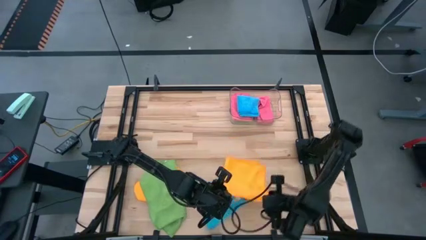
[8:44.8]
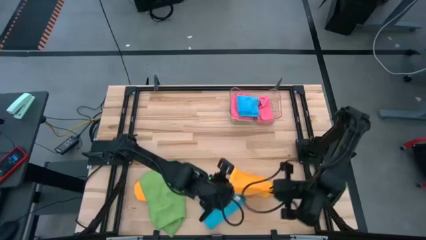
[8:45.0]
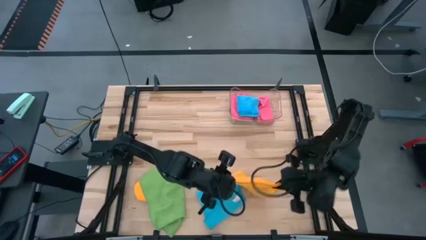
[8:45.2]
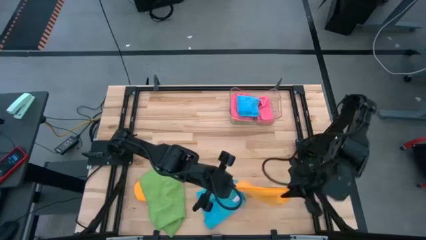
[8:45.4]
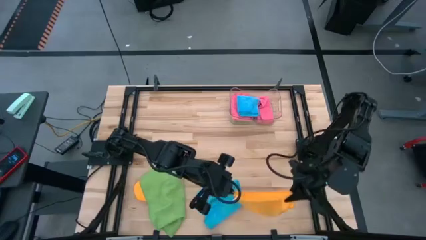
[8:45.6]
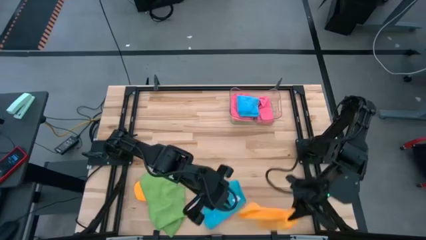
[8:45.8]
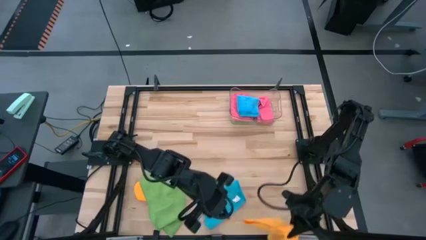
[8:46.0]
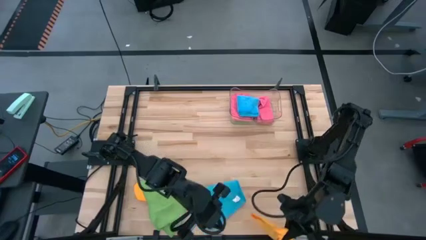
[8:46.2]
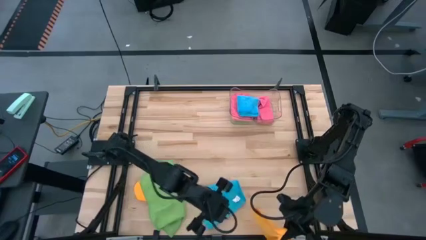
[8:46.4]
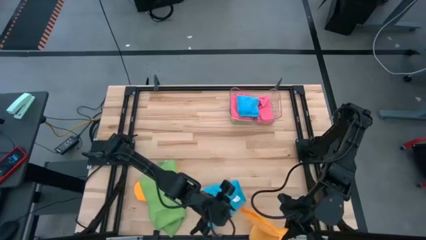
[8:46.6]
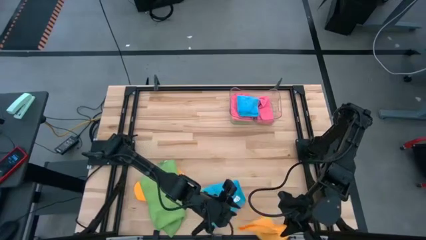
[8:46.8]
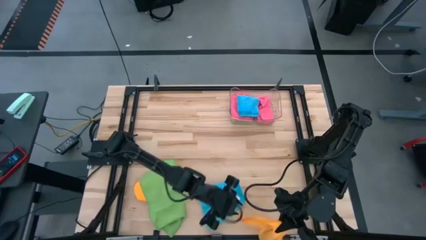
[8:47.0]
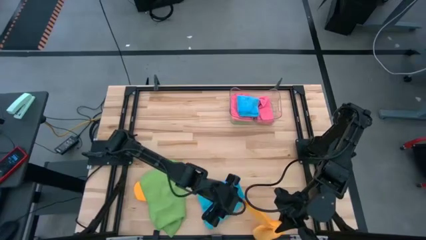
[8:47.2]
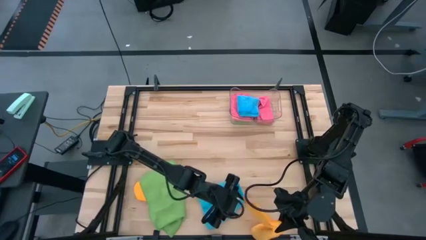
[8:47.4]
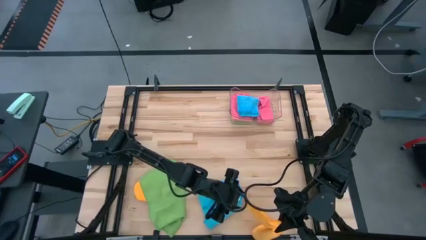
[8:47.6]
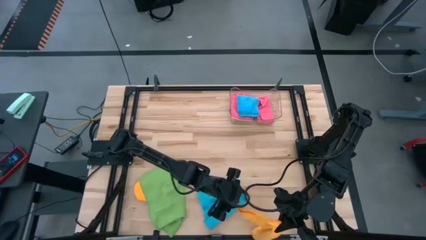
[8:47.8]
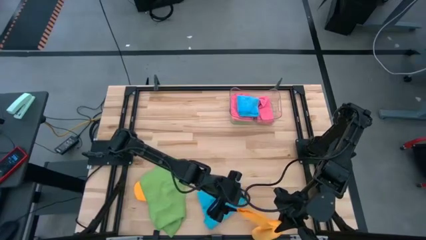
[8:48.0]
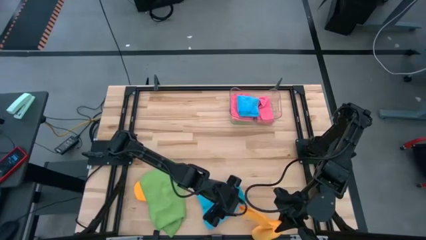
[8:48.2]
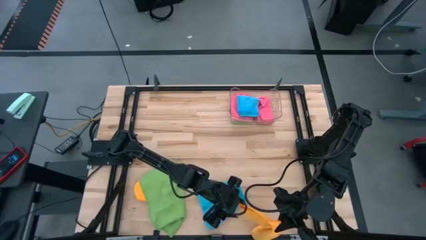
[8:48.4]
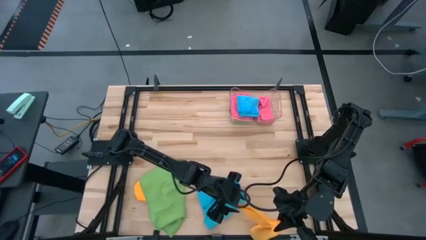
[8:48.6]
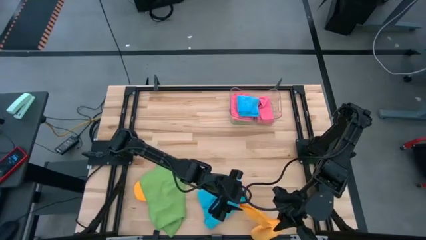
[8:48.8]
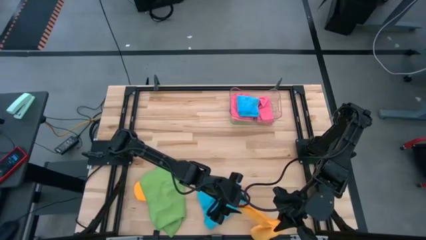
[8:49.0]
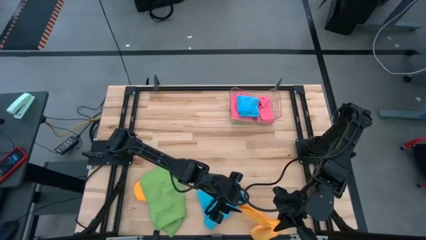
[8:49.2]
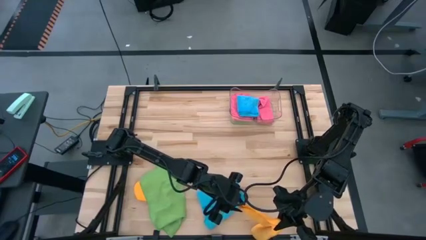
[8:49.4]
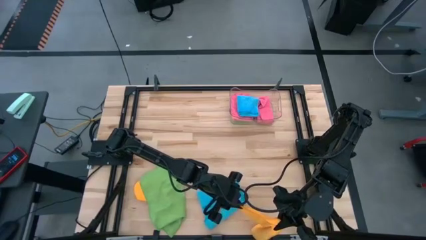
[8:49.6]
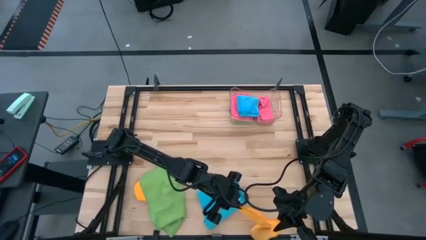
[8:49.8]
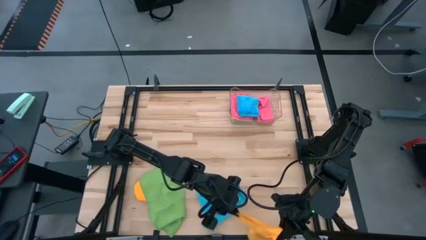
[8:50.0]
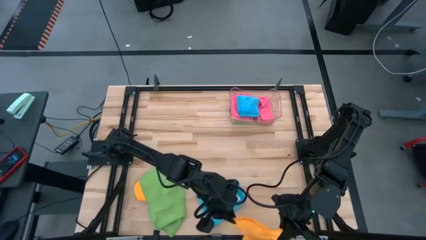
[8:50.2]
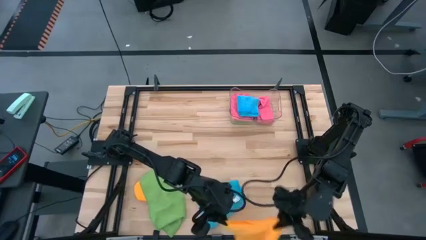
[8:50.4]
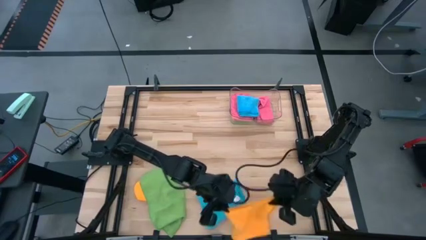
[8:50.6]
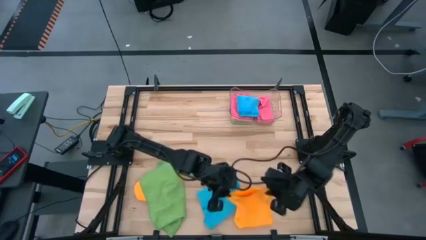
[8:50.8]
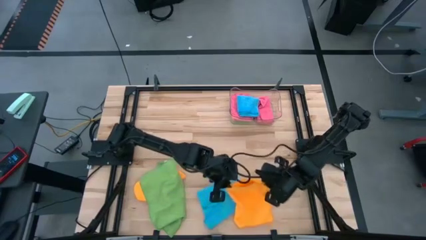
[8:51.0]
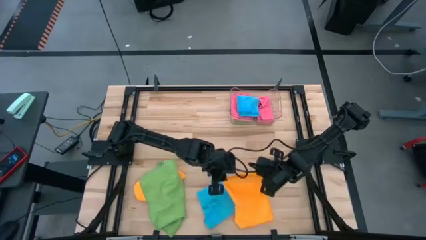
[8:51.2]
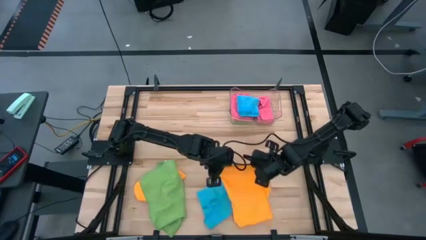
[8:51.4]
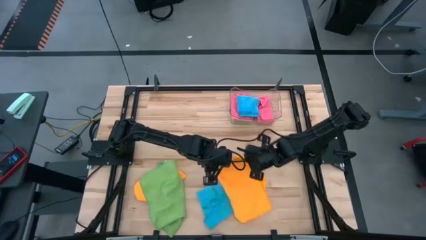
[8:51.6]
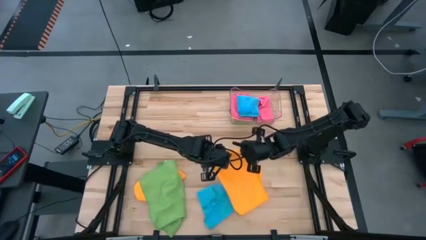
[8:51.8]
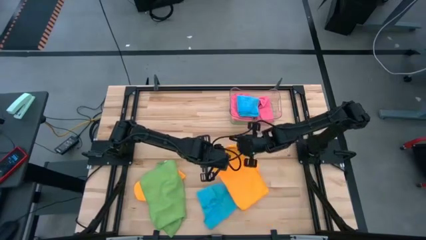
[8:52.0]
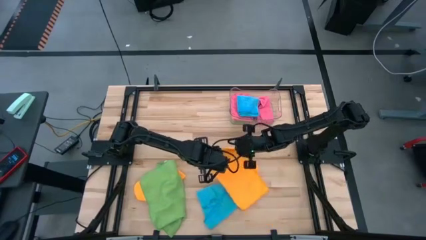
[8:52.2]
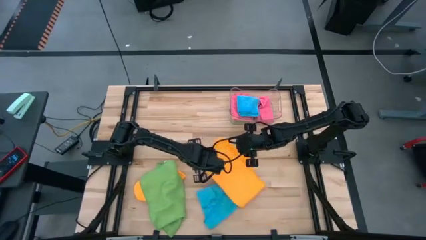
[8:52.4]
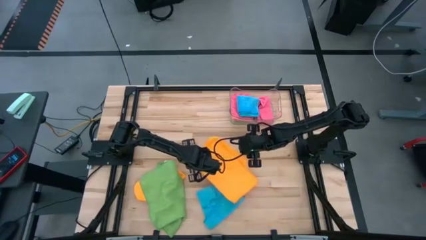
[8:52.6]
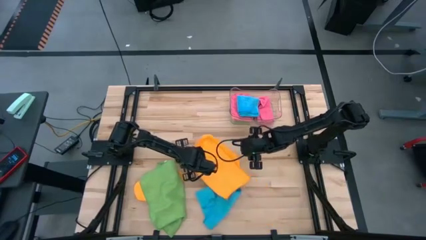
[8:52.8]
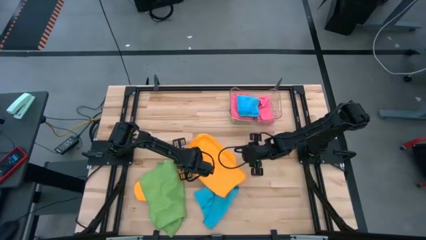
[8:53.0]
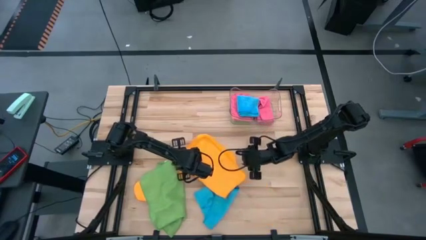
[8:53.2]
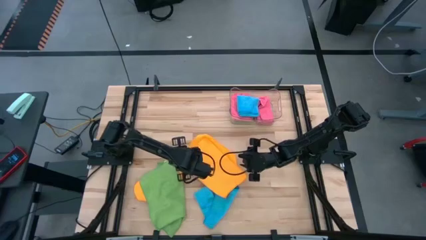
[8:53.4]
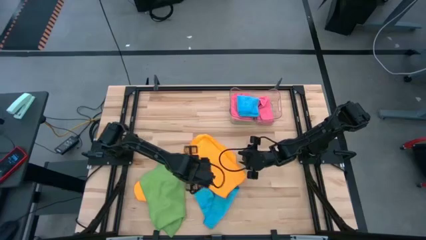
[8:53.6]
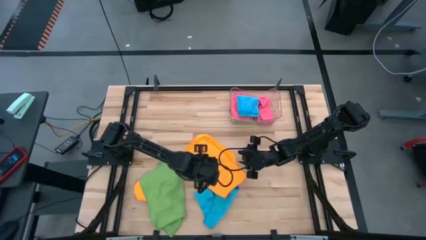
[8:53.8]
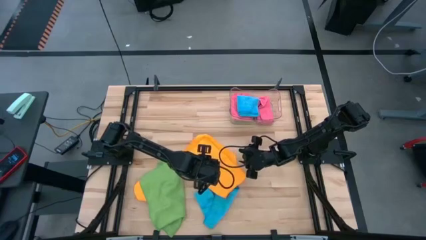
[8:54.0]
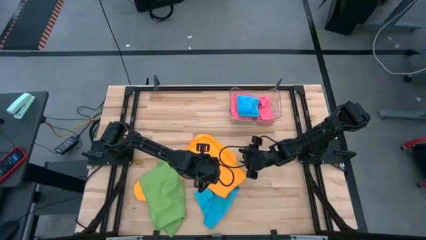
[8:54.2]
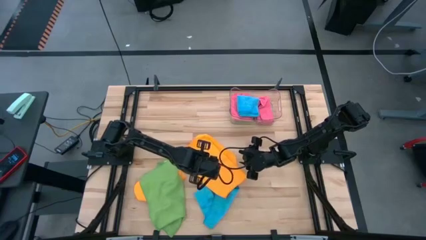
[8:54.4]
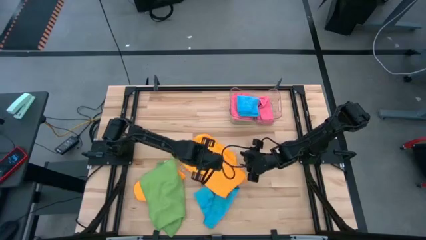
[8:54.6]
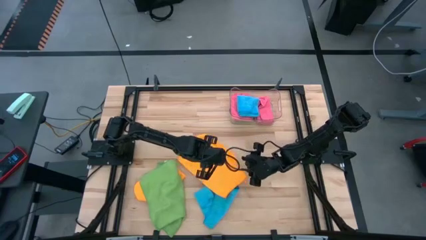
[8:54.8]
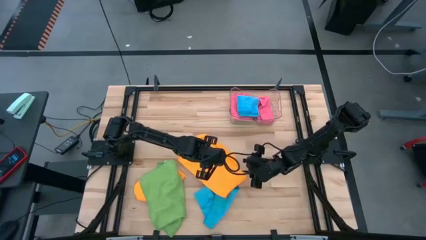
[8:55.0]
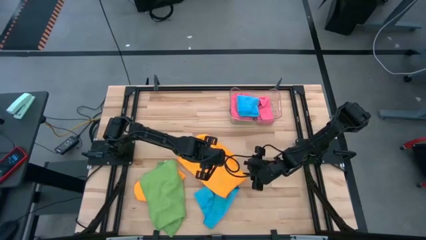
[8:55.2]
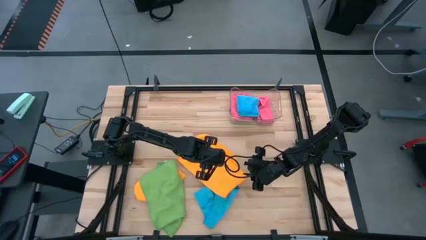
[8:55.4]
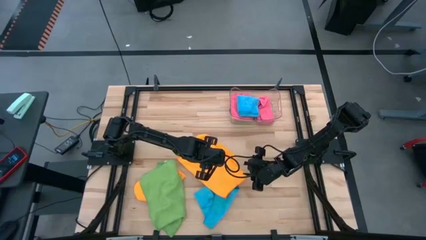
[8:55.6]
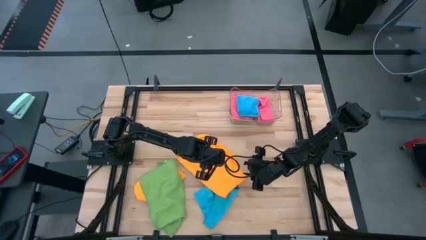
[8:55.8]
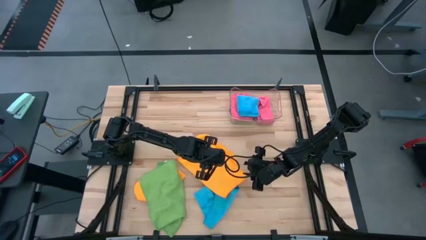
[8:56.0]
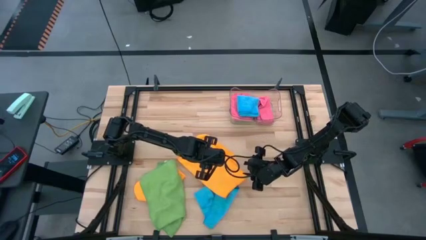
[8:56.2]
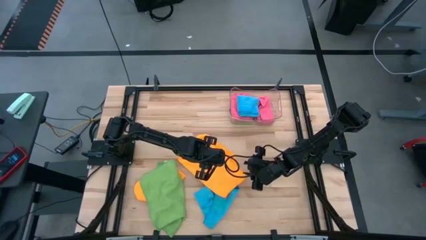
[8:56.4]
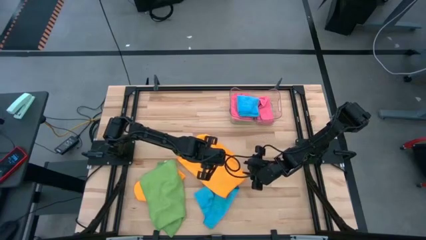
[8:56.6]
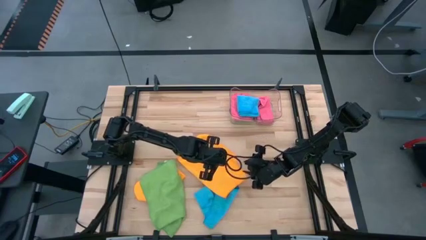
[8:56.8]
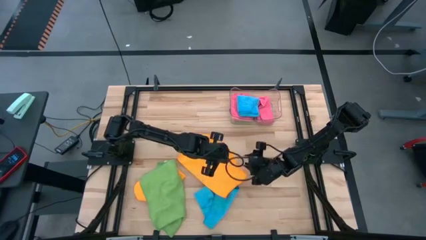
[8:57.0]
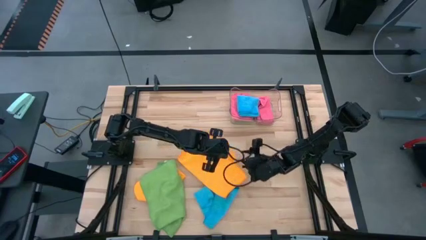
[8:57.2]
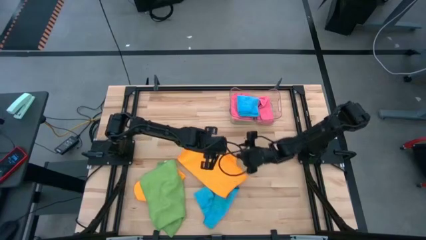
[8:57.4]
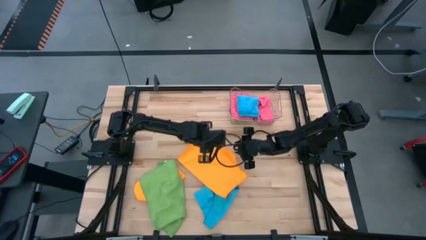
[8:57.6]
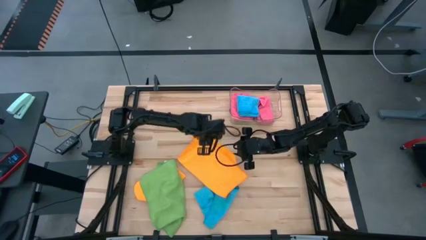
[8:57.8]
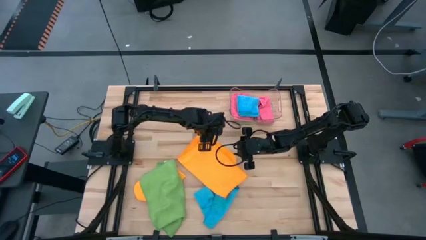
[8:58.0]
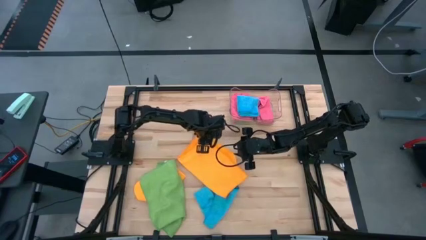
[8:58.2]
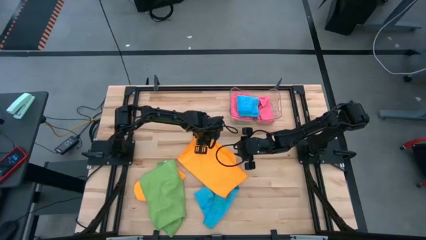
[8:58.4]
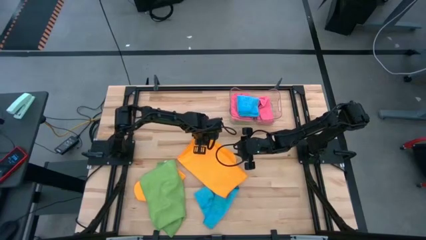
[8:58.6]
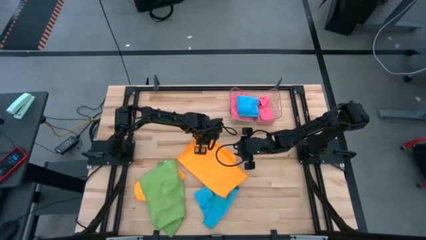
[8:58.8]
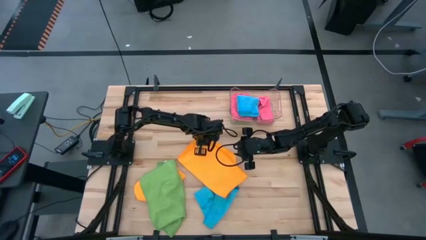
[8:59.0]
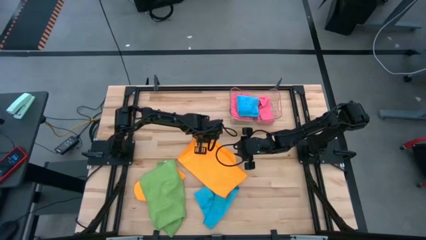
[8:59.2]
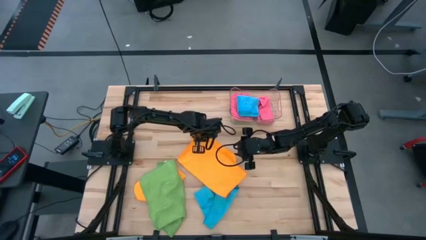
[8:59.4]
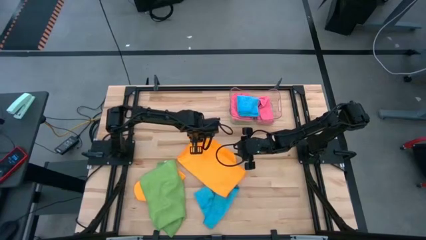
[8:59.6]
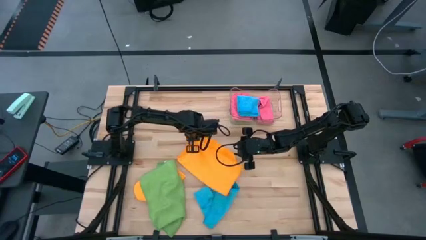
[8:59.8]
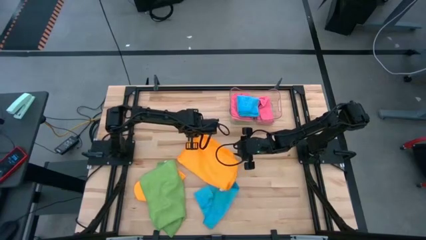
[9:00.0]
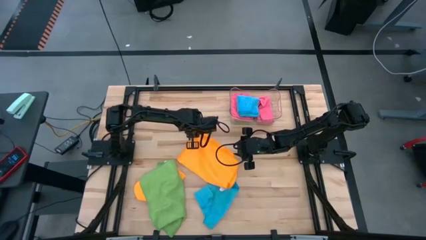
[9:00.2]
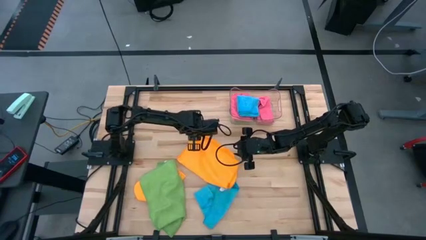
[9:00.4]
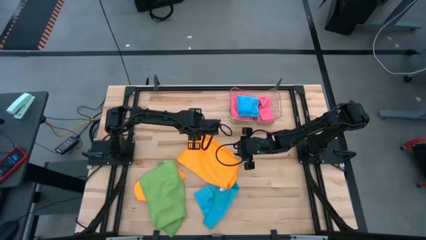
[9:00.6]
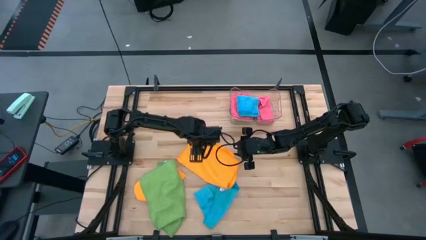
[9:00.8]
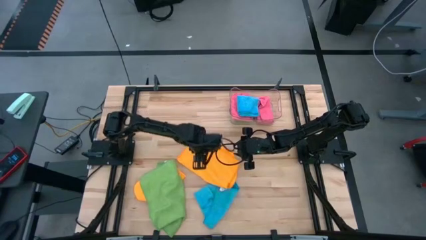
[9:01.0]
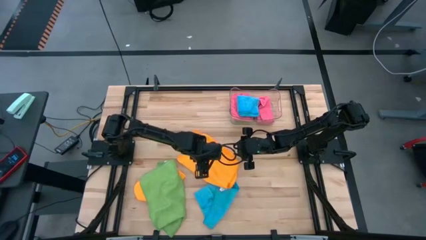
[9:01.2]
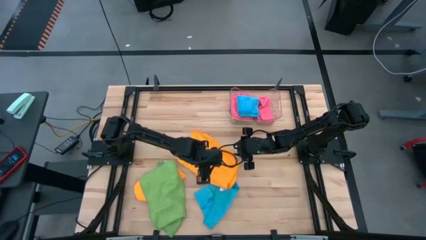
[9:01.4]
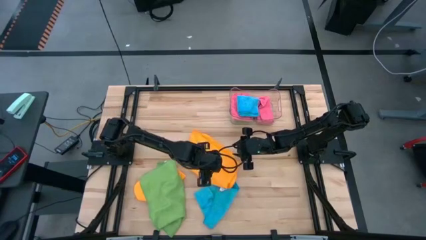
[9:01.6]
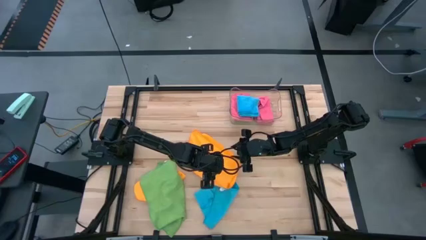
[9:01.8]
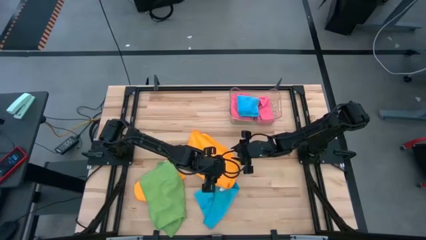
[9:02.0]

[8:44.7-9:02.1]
Task: Fold microfiber towels
Fold the right yellow towel
